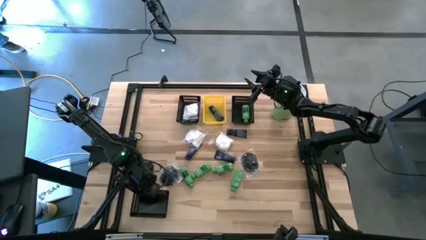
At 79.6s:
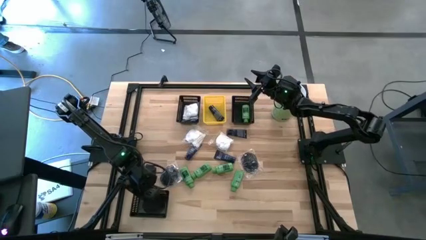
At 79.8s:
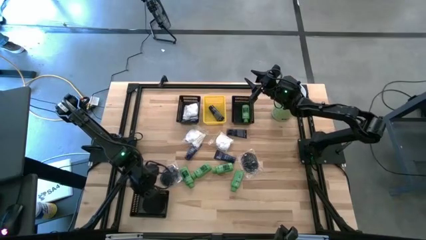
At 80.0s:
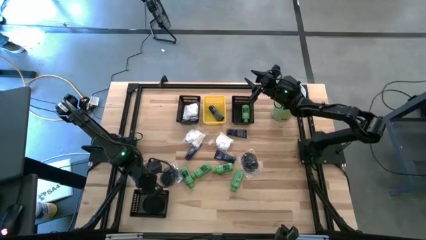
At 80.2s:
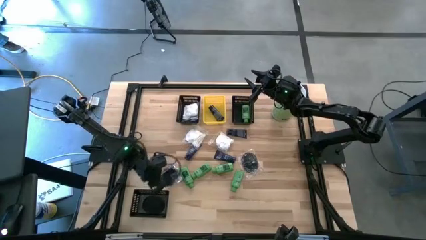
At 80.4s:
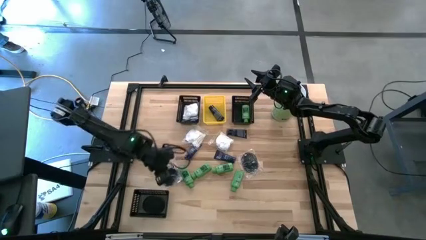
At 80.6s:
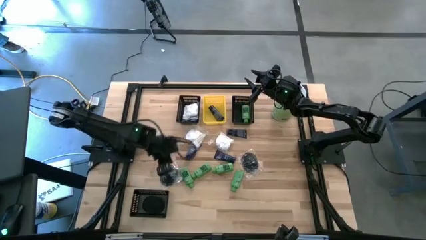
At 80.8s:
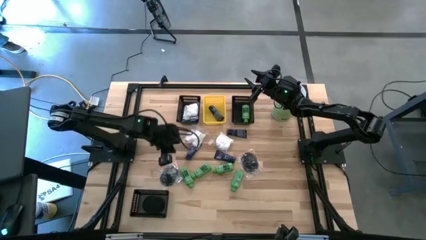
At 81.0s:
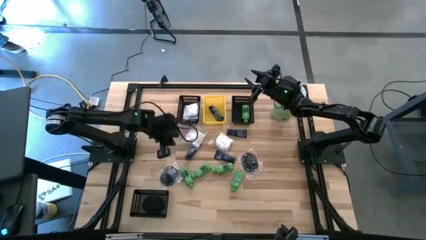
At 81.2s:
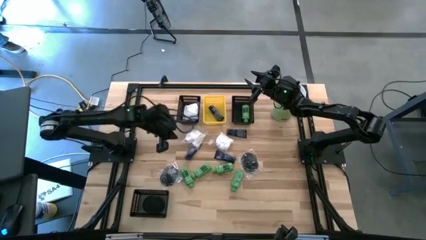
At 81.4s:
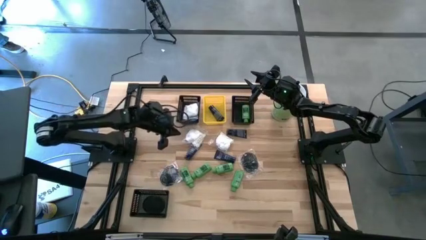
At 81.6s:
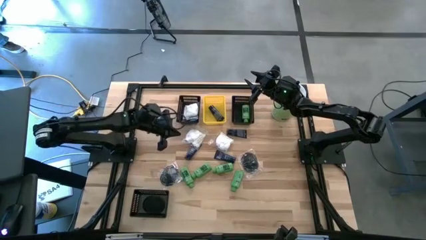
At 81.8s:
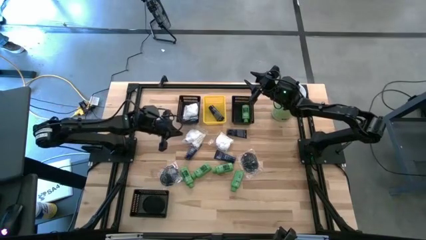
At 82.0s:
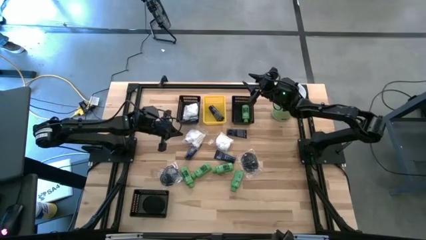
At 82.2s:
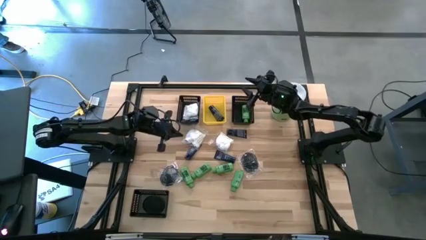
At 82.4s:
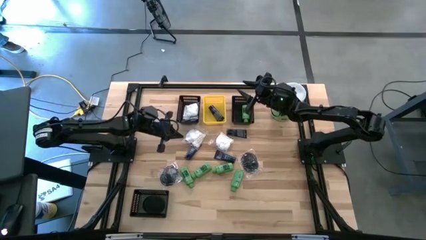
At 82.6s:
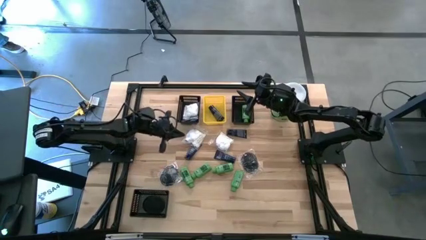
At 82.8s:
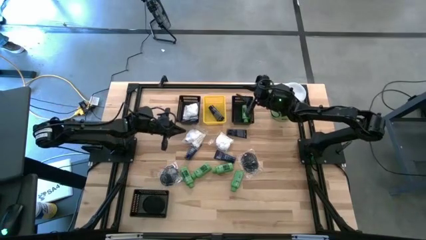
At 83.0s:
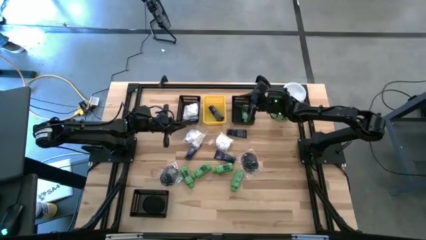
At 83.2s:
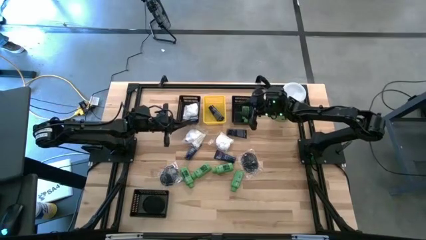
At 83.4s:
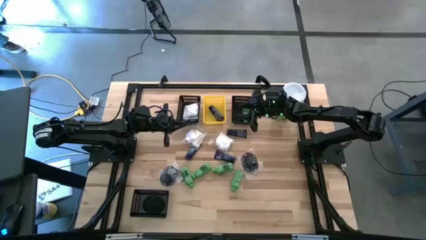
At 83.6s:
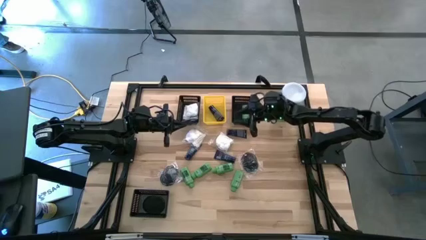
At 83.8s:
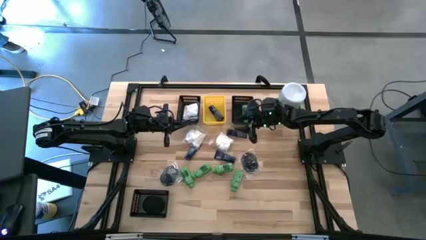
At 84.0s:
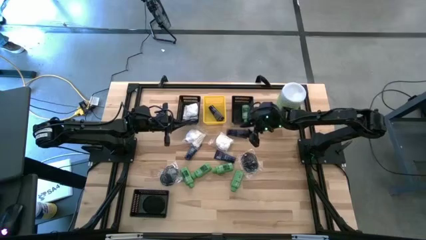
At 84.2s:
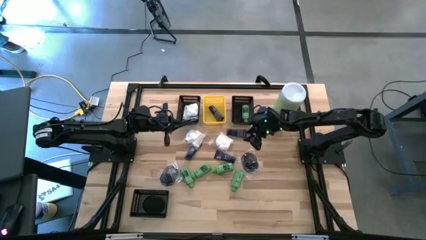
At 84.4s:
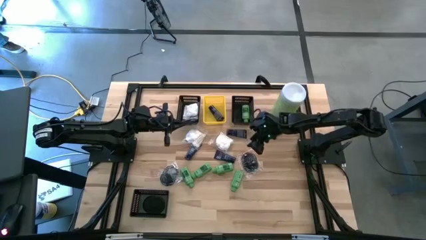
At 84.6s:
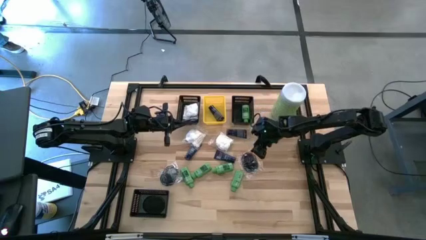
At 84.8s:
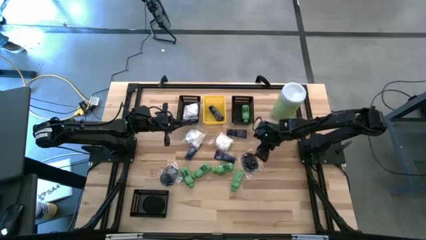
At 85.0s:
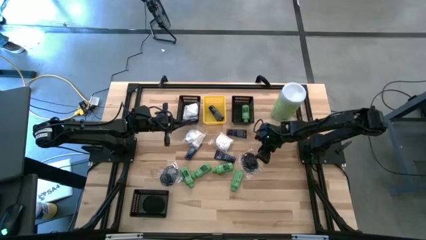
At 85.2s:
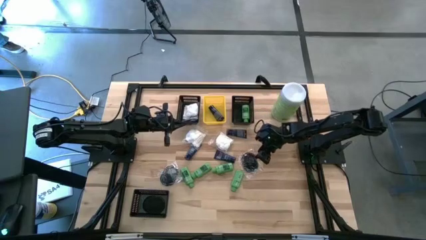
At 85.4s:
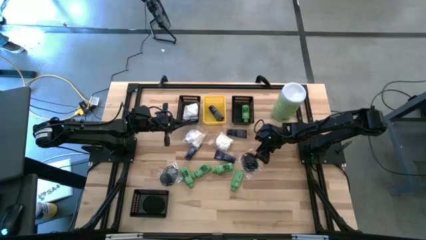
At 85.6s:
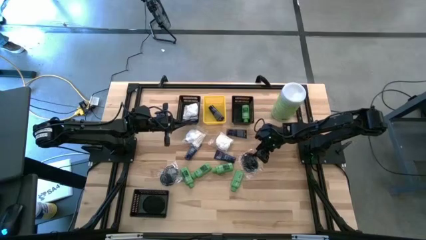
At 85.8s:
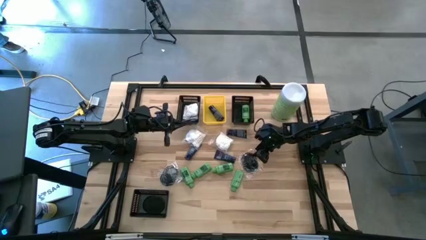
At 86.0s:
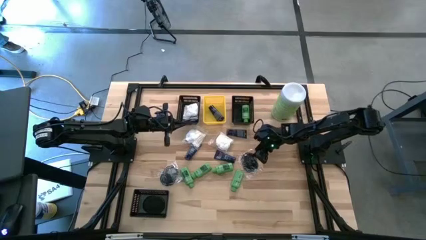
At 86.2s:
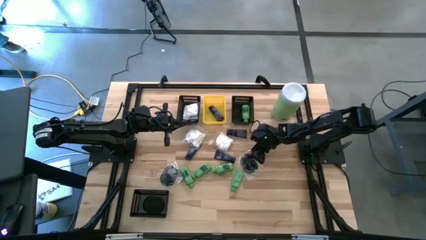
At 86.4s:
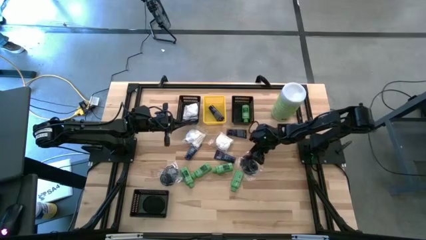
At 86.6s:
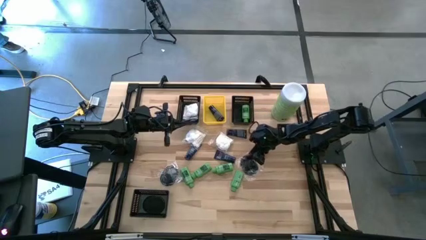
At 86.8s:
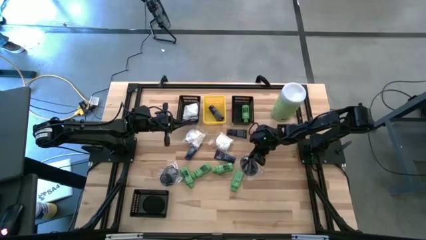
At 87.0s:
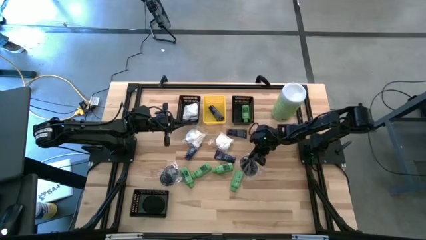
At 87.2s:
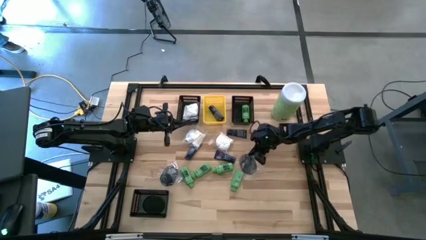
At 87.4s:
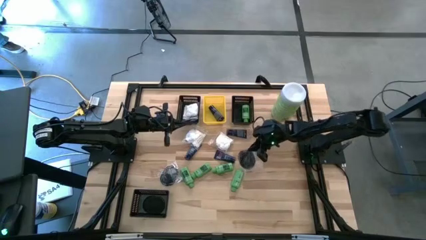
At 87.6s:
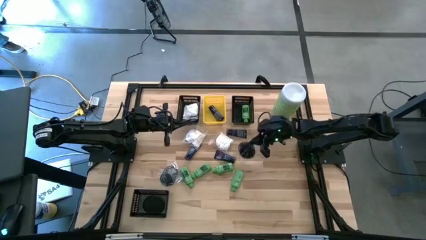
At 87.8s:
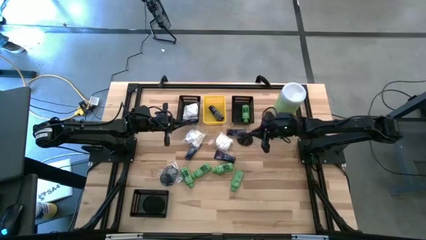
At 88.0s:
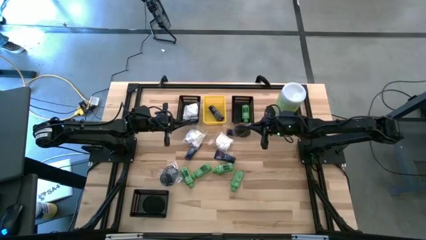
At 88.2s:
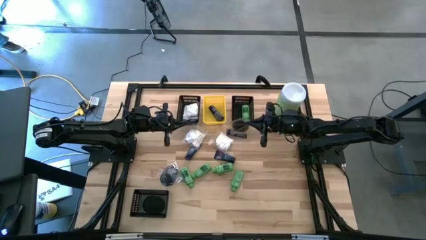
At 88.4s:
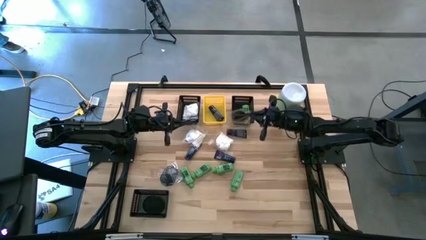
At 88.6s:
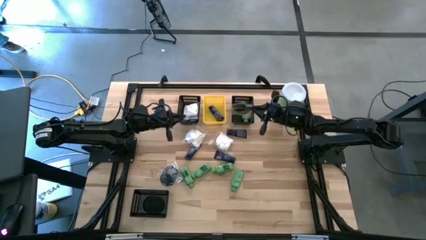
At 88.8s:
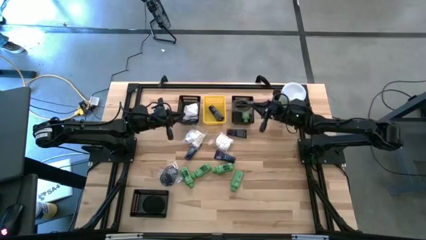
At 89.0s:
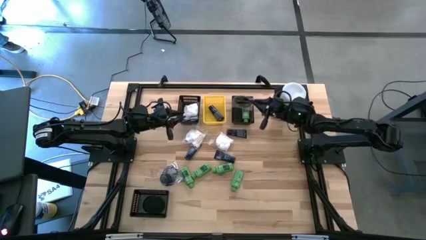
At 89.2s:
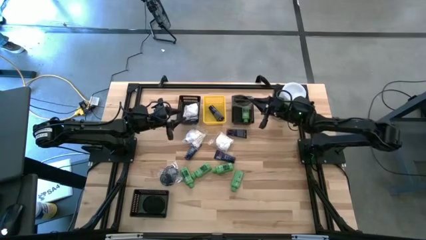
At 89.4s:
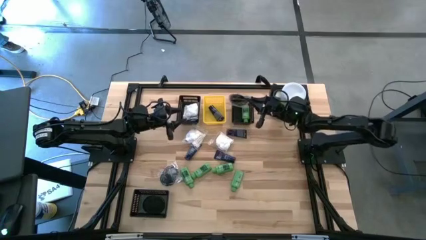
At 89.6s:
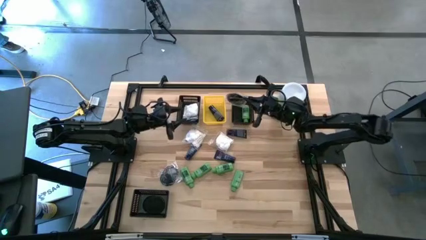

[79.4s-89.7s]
Task: Pick & Place Travel size toiletries
Put the black hairbrush into the bottom black bin

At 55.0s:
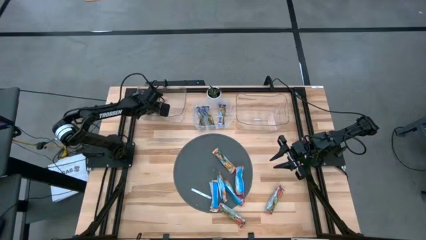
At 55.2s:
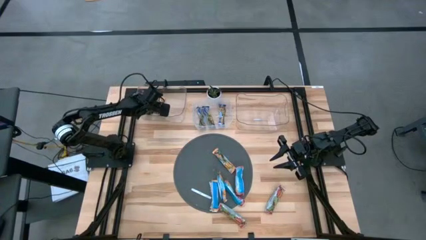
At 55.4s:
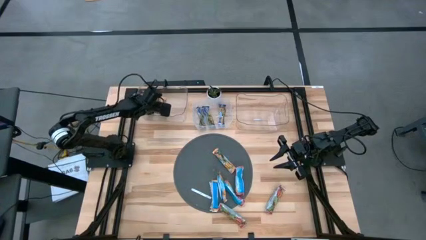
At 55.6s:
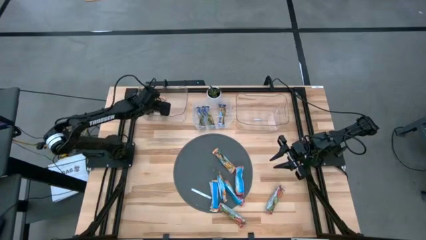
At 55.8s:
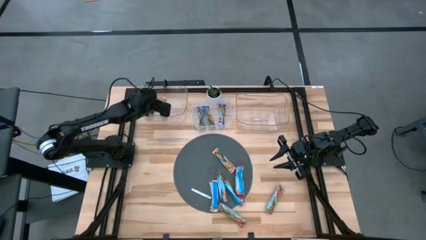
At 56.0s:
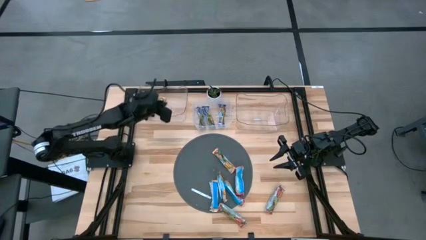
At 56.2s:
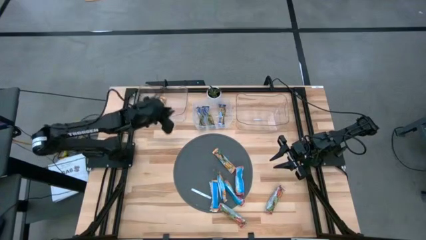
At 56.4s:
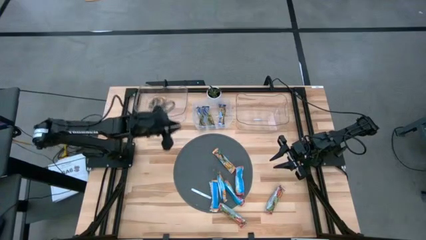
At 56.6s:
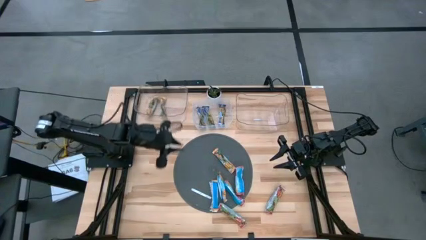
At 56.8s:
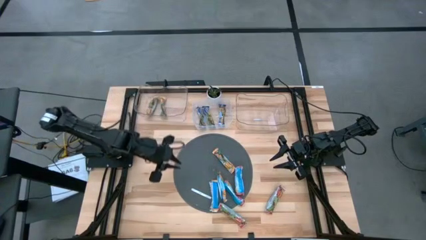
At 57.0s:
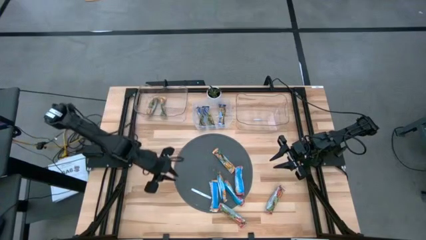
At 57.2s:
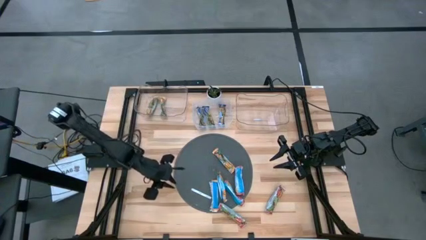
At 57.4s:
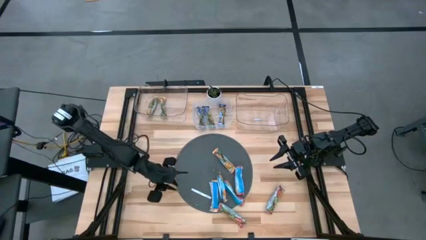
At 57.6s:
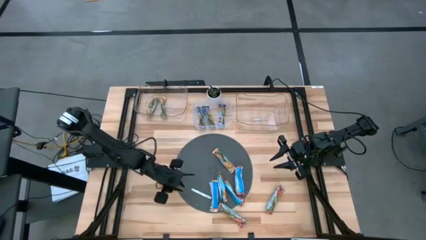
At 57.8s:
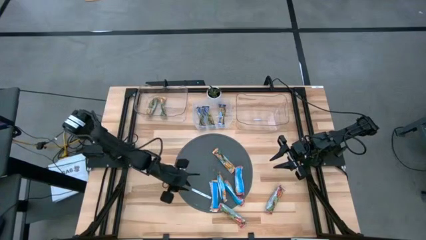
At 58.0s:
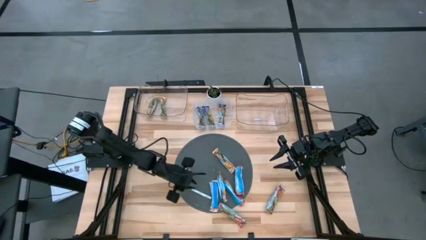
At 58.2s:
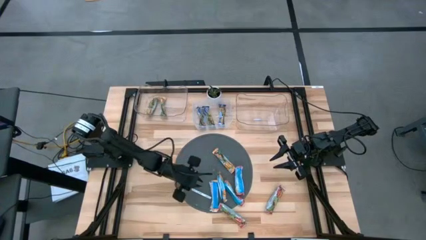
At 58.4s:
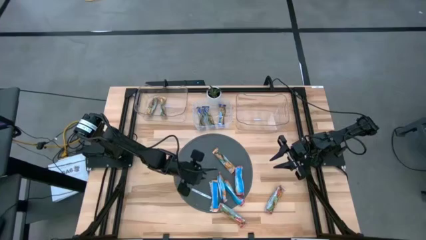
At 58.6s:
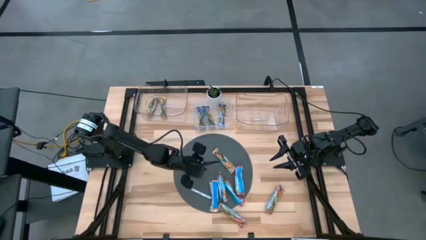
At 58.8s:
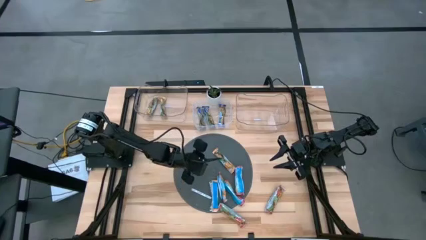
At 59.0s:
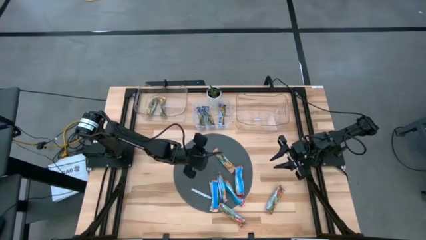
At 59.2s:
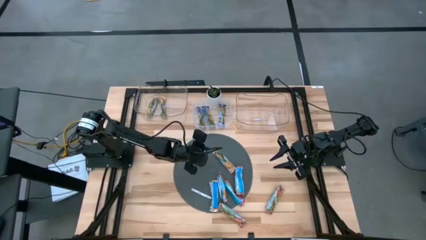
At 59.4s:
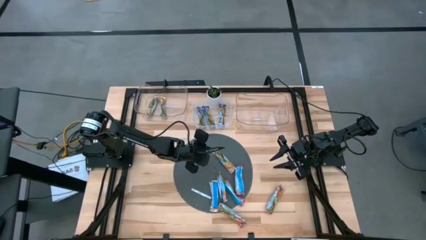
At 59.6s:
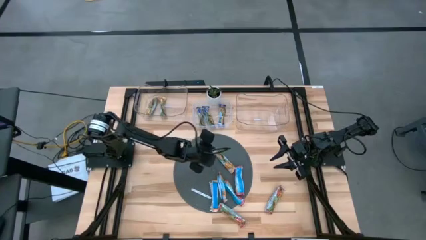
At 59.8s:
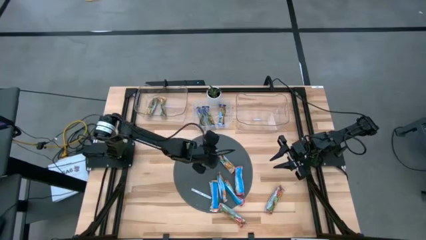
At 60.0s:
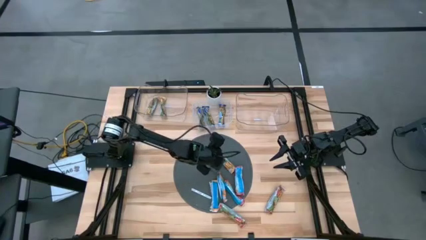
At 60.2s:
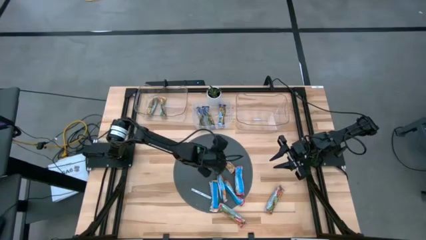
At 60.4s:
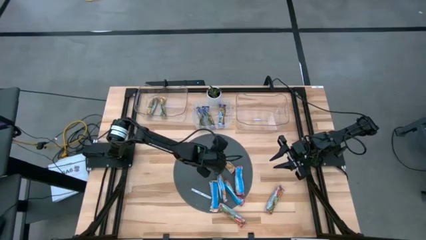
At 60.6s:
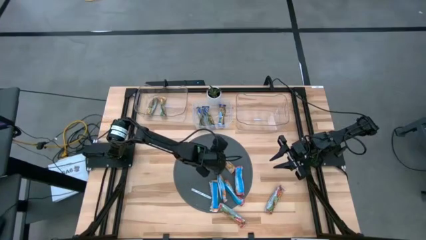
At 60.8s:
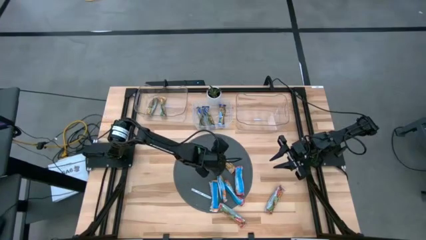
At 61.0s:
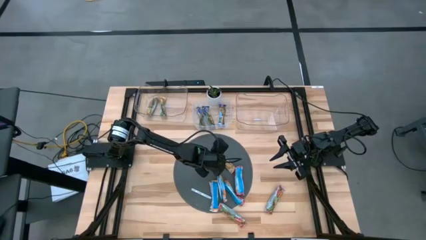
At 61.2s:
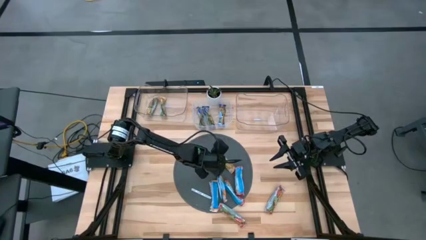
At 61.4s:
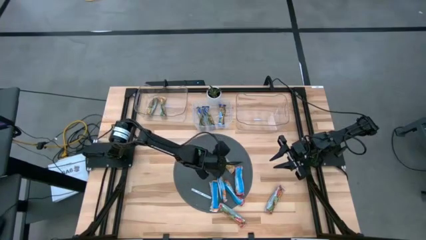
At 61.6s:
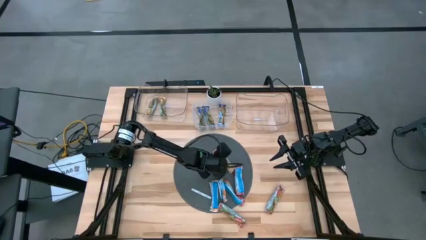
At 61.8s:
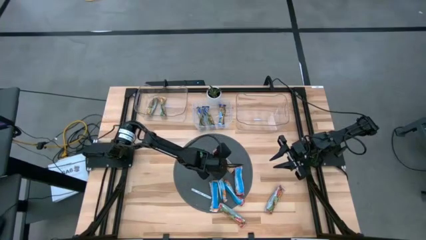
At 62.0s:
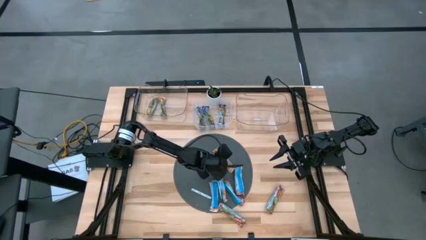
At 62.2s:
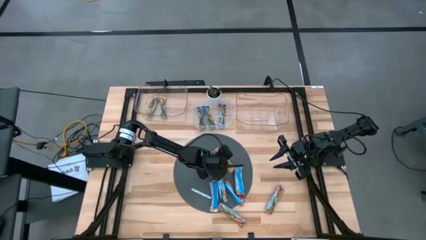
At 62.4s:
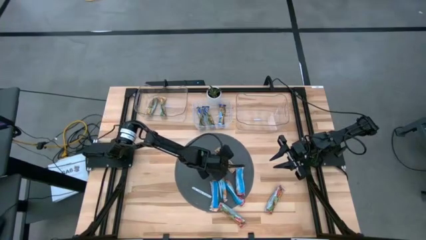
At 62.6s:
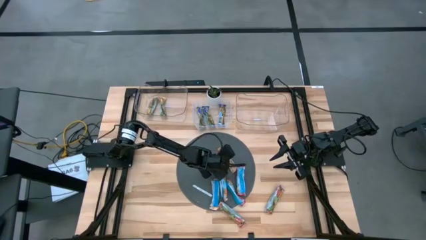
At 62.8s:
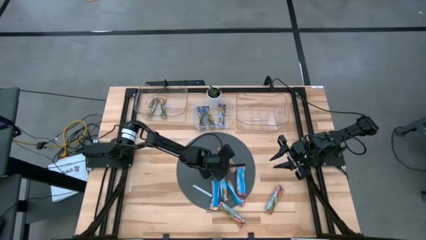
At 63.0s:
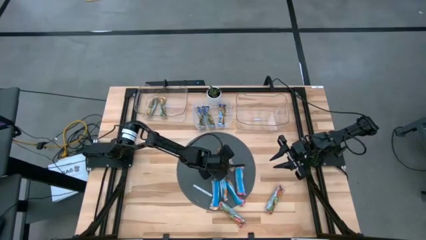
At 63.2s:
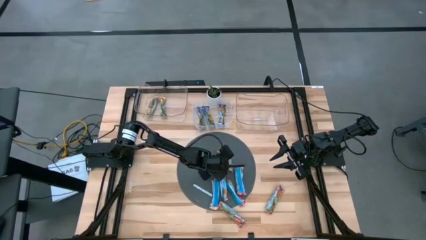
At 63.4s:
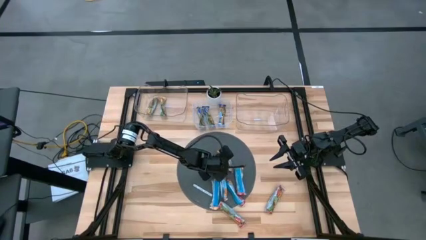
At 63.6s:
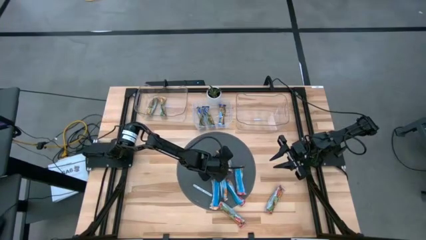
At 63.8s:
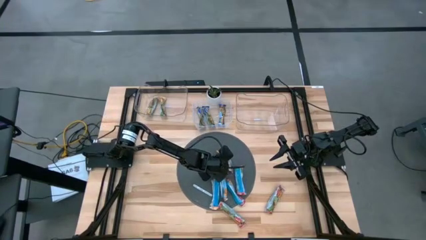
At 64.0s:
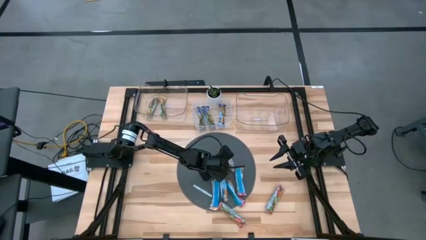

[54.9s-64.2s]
Task: Pick and place Granola Bars by type
Put the yellow granola bar into the left transparent bin
